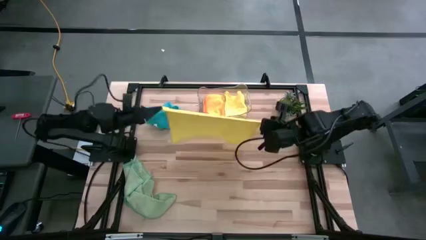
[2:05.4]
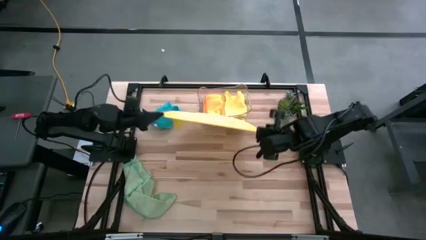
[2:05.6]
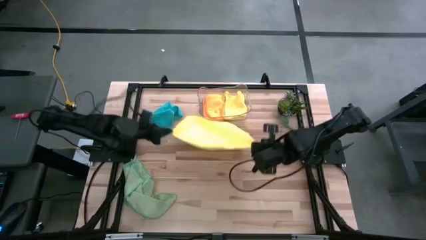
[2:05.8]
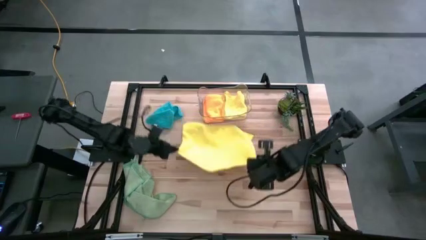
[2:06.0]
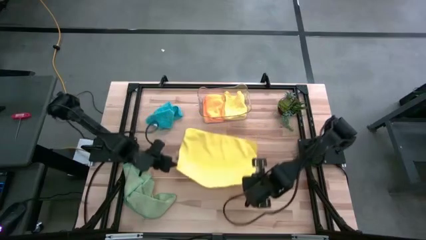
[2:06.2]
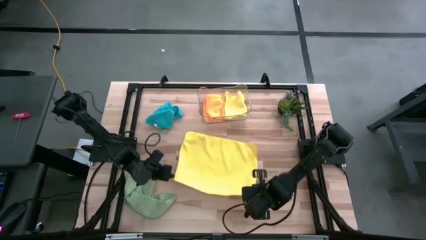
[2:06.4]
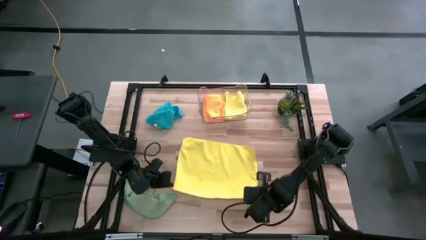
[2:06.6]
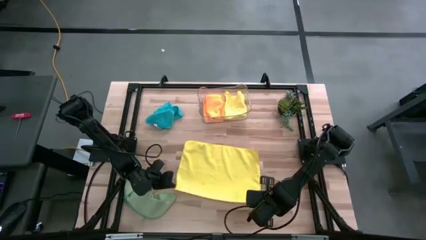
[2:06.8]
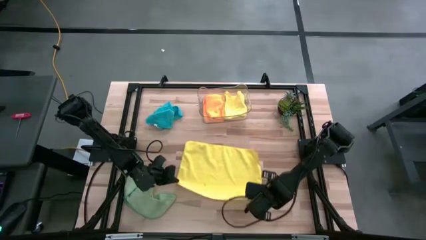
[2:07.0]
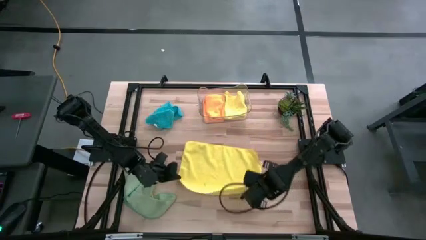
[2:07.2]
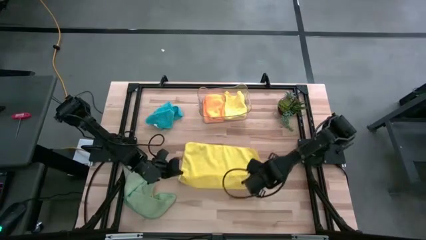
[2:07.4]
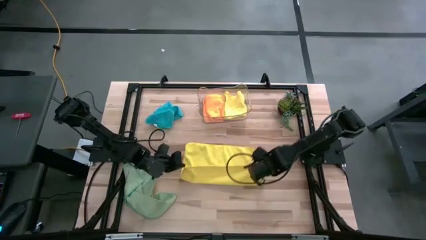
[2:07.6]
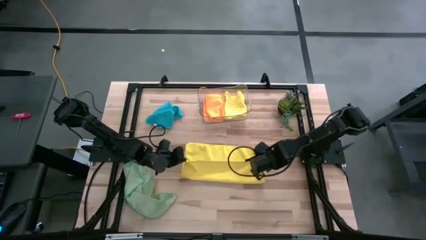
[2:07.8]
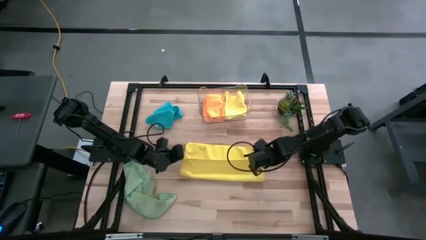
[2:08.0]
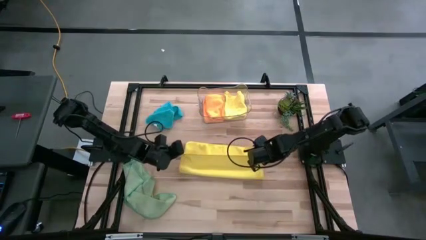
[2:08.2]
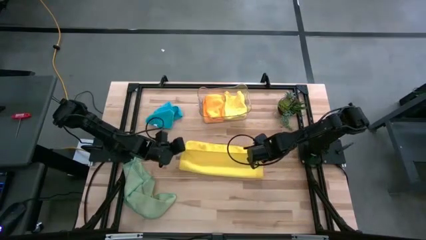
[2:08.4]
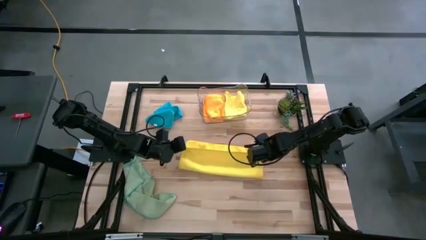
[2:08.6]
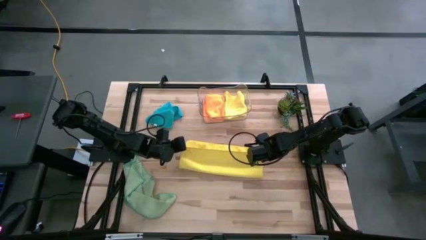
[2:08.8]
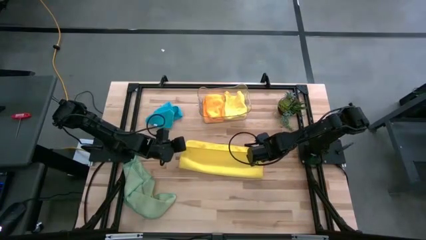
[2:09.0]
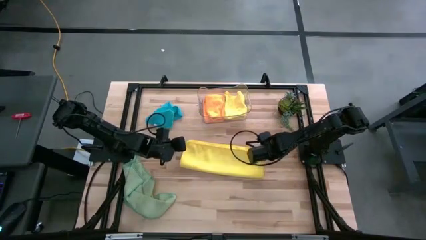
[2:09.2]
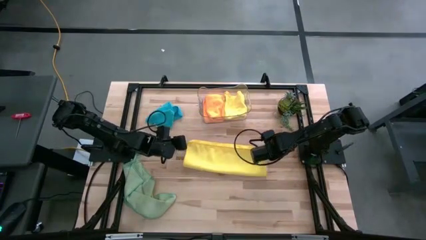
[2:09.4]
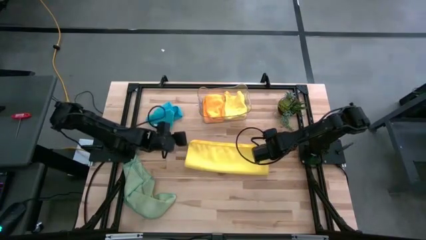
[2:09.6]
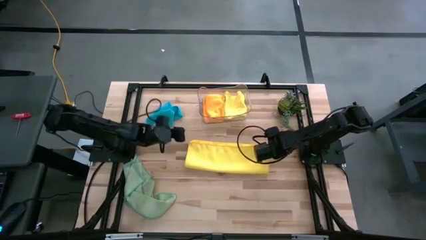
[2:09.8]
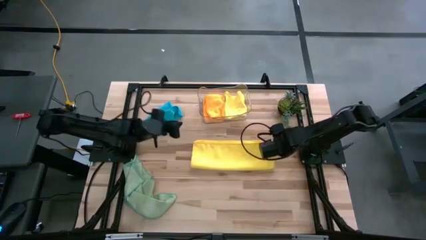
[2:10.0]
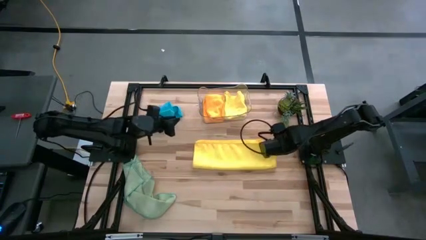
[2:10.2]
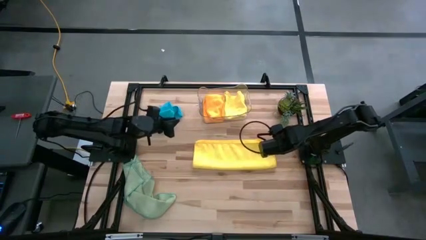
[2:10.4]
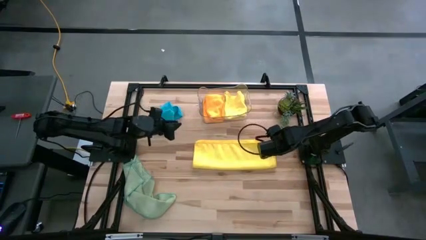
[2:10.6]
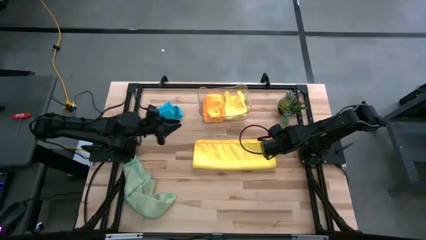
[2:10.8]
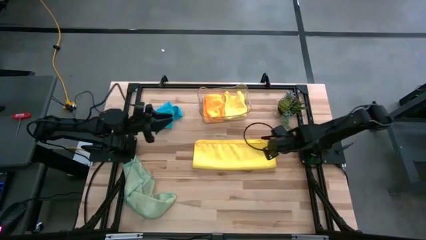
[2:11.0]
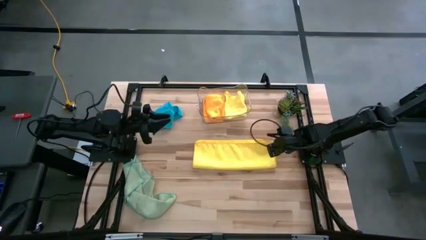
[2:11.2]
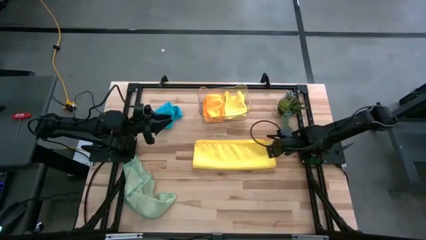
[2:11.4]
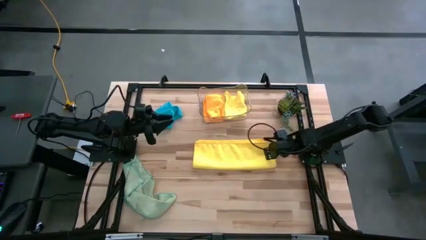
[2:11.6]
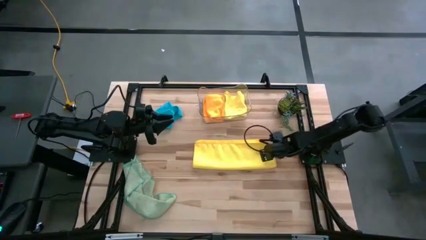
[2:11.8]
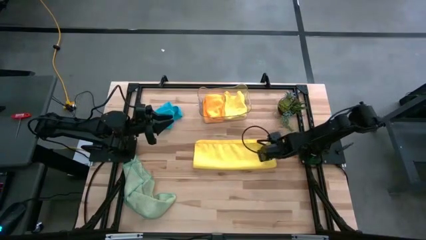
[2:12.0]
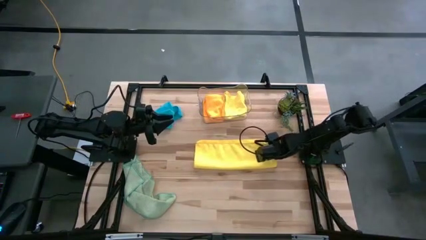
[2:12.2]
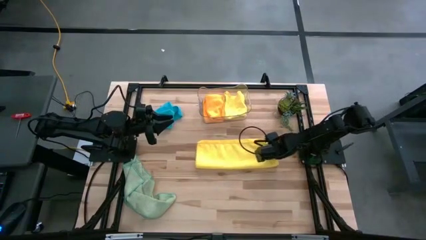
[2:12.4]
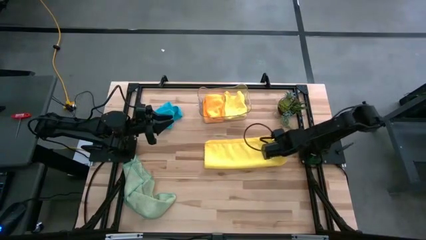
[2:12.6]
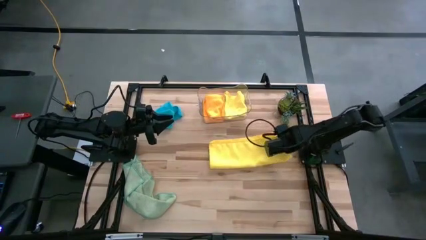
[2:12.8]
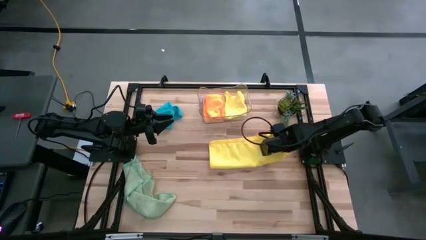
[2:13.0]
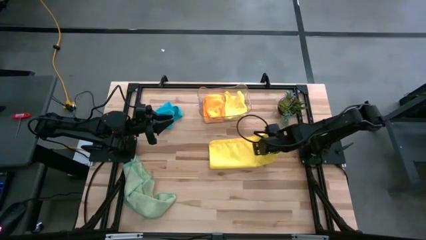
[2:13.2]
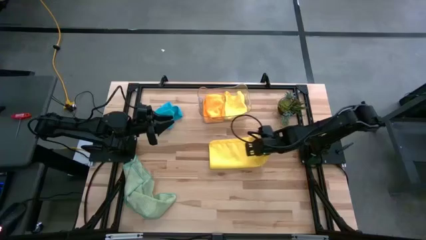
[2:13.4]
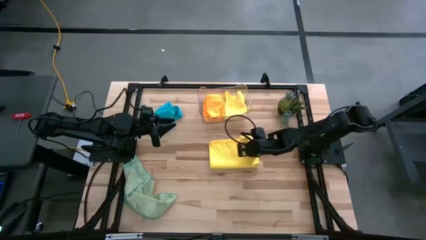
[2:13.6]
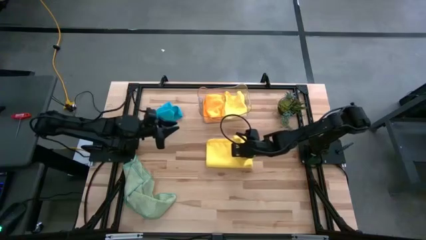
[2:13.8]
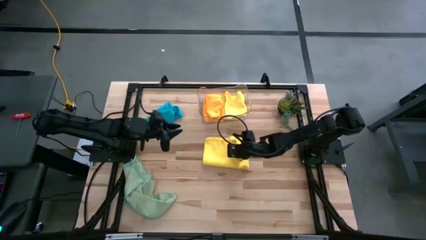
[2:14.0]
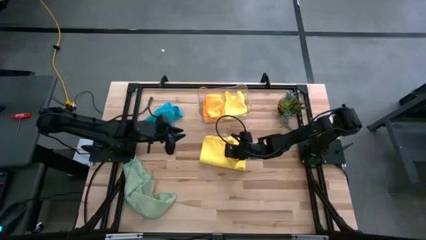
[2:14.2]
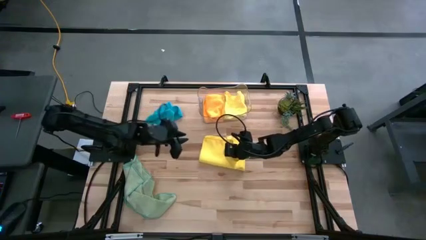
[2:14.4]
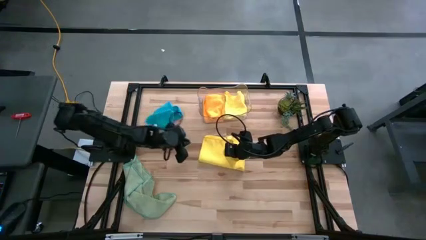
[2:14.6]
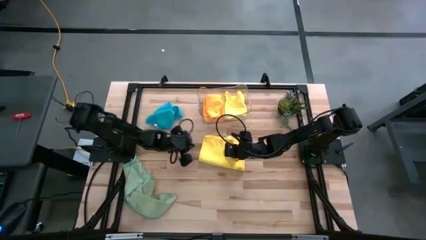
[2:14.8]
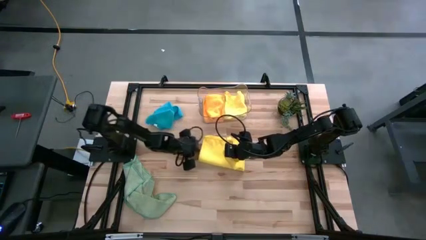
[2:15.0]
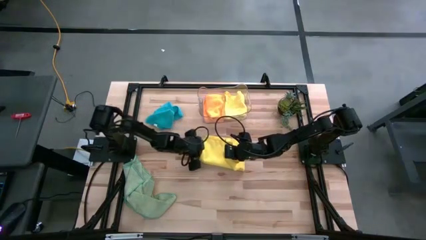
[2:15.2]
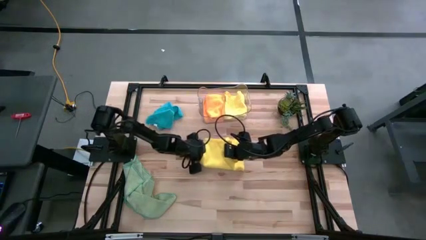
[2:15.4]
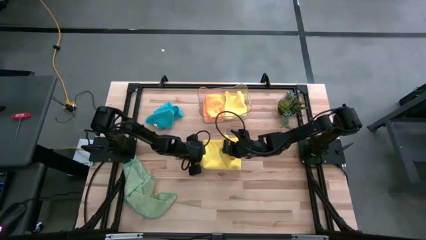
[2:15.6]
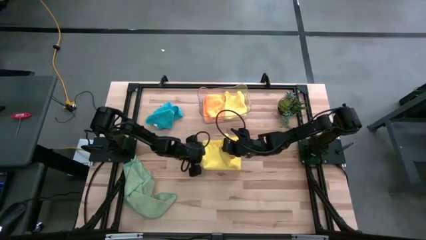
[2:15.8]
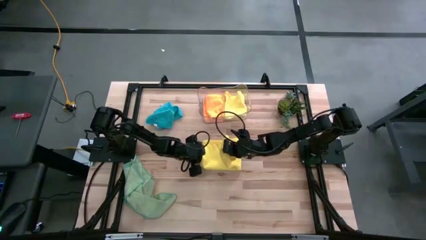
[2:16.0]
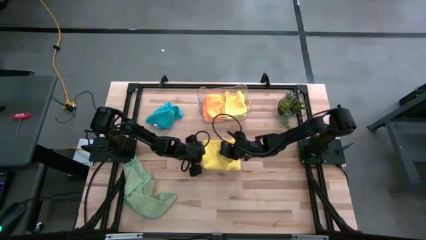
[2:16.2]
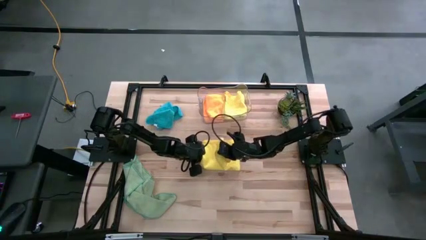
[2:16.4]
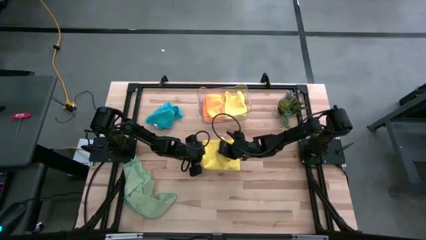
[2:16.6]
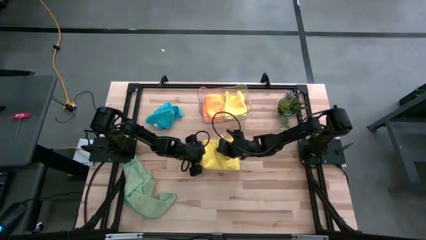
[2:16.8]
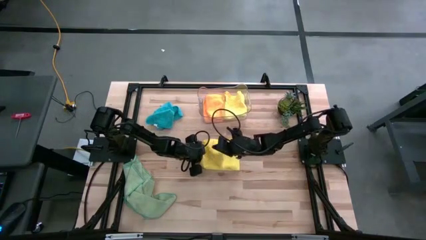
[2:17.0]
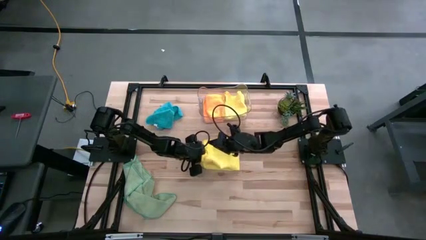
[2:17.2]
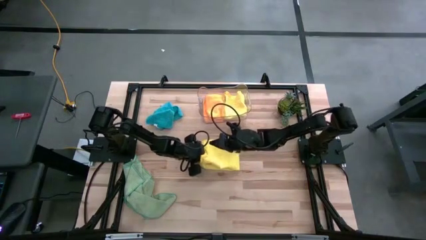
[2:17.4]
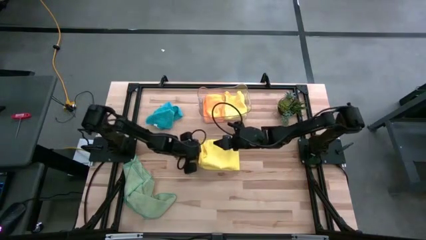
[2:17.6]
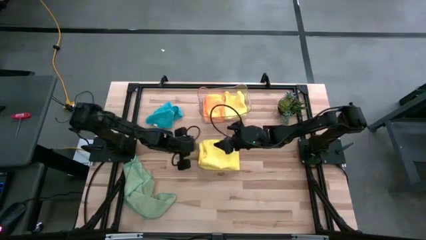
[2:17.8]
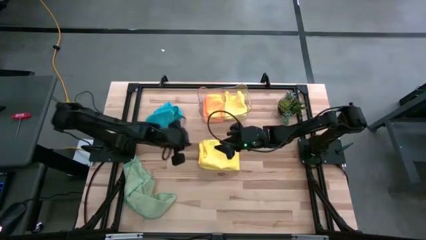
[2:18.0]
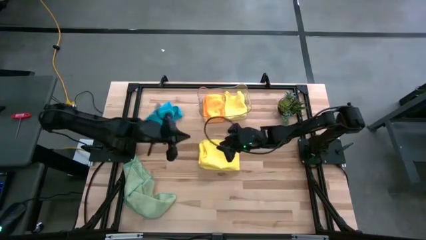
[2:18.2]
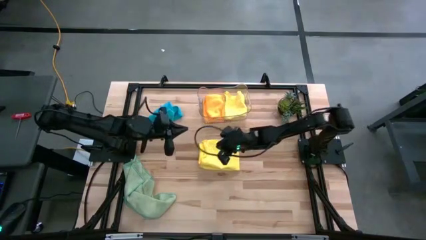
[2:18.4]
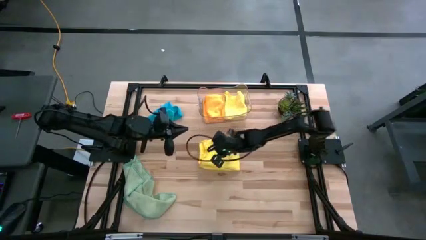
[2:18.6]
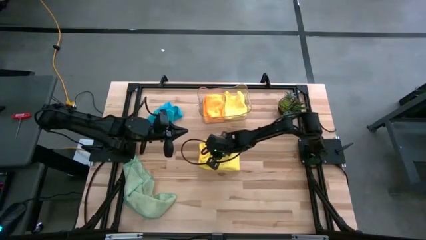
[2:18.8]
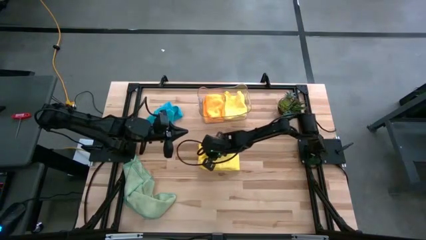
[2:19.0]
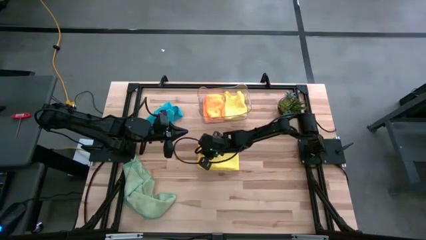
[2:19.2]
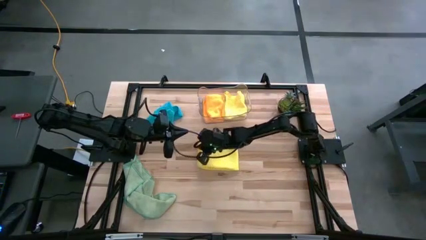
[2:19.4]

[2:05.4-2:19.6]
Task: Fold microfiber towels
Fold the yellow microfiber towel

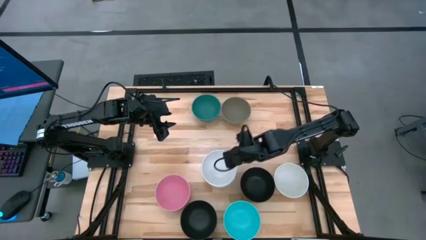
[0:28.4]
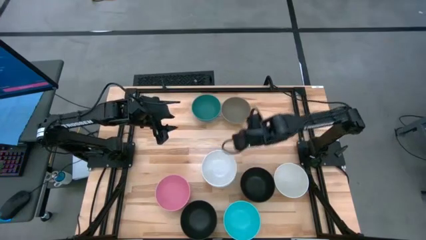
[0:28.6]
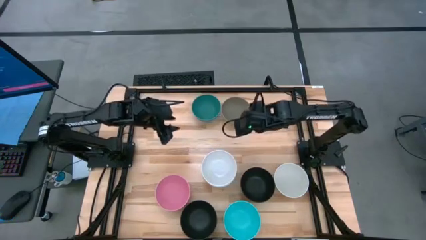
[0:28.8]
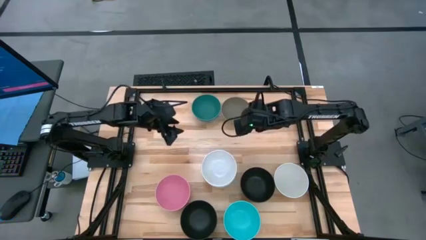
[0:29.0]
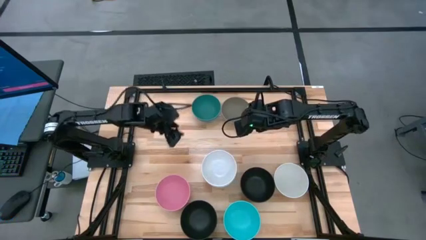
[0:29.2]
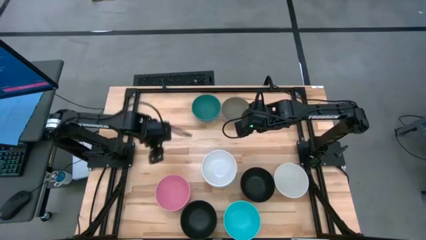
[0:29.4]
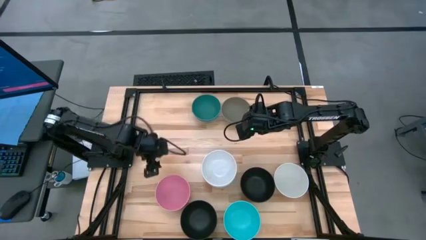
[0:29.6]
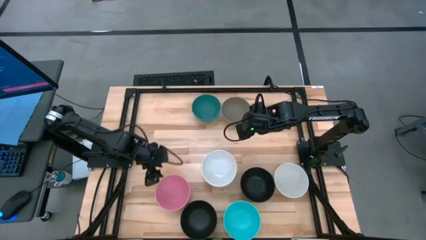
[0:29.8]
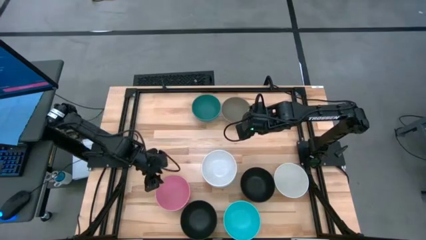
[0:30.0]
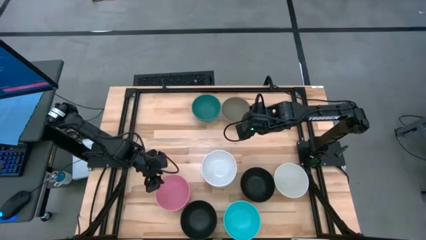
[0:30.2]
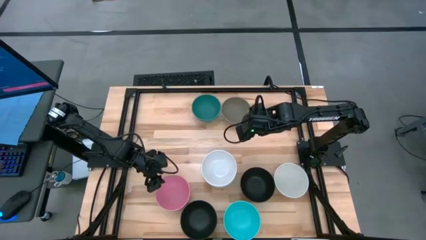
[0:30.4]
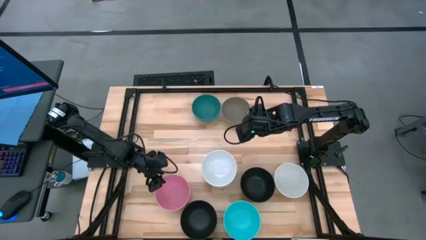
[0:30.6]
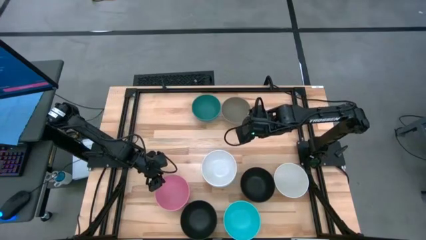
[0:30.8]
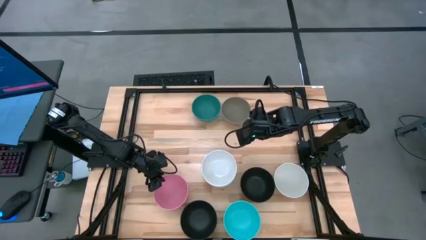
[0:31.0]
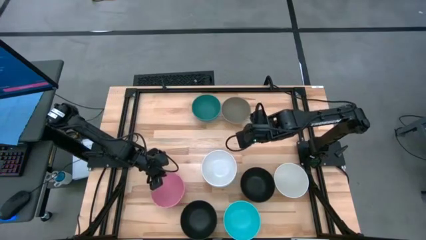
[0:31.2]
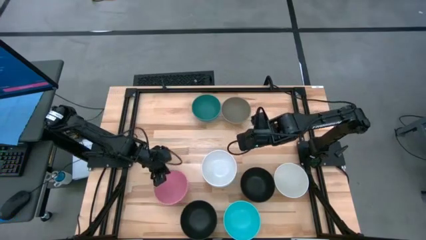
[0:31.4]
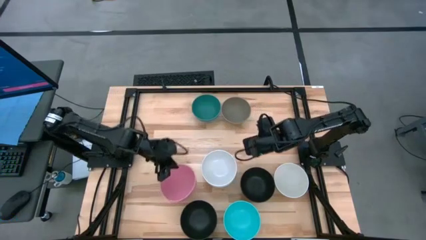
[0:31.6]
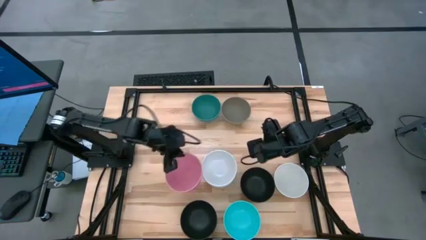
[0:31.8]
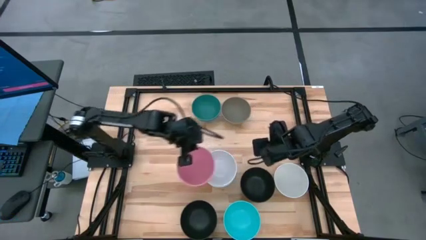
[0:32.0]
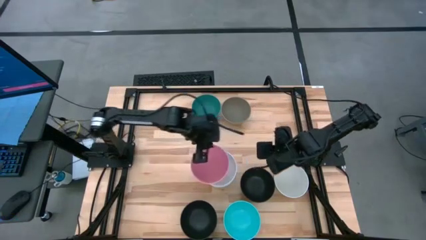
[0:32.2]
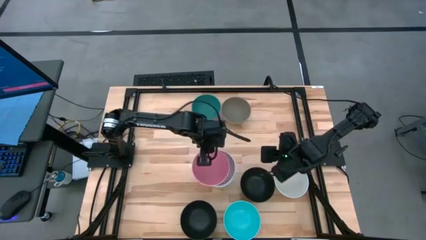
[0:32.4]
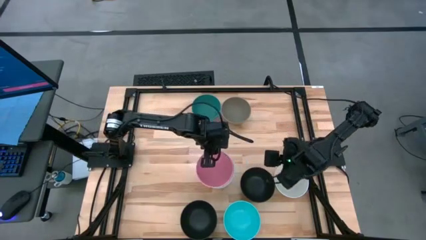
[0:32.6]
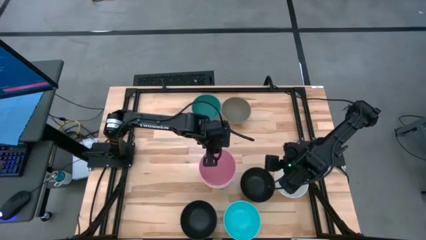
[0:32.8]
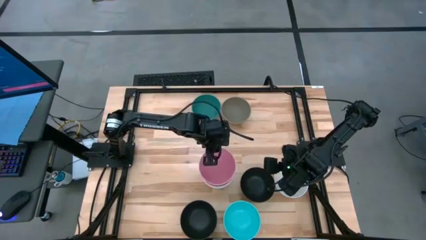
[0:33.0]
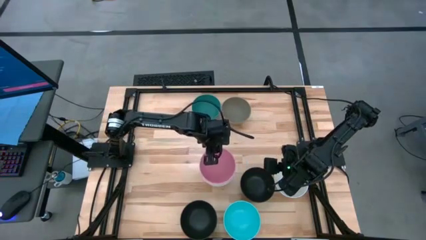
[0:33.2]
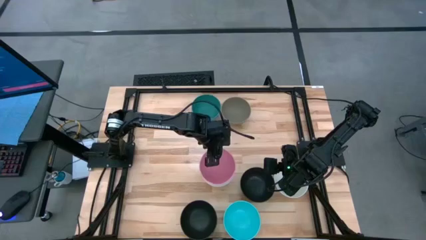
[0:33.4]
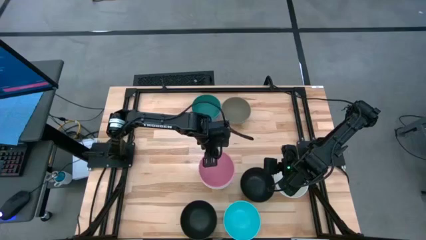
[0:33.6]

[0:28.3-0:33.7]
Task: Nest bowls inside each other
Stack the pink bowl on the top of the white bowl
